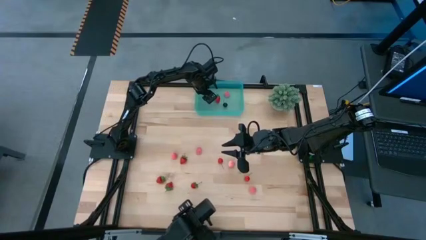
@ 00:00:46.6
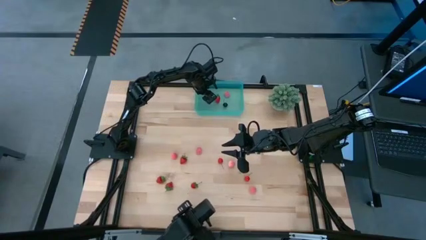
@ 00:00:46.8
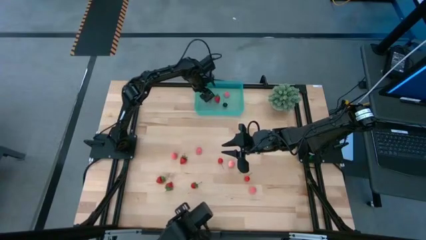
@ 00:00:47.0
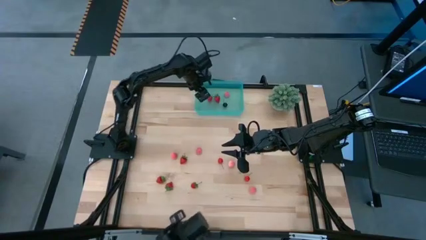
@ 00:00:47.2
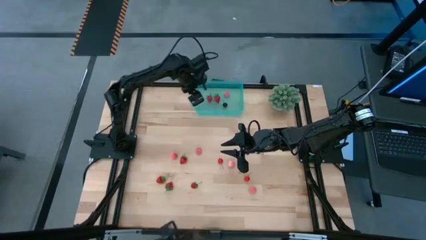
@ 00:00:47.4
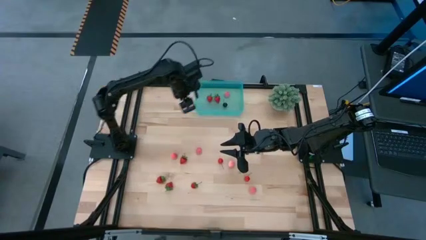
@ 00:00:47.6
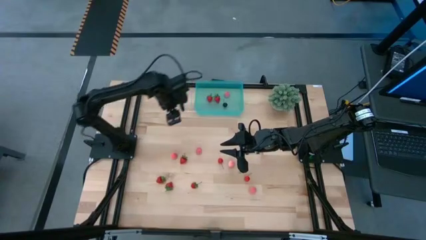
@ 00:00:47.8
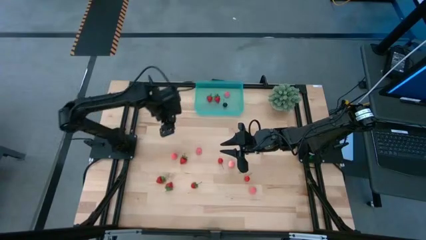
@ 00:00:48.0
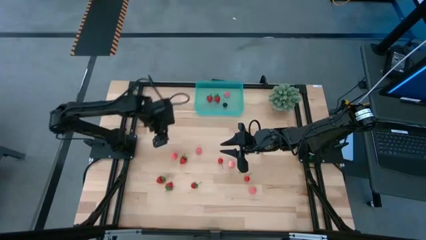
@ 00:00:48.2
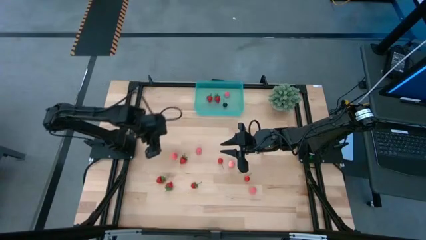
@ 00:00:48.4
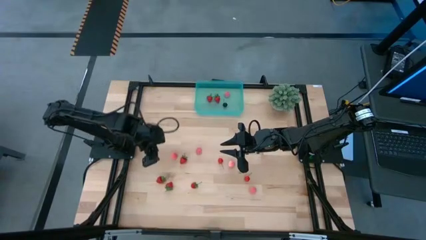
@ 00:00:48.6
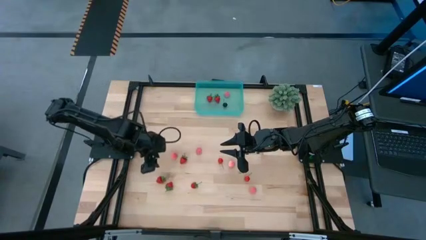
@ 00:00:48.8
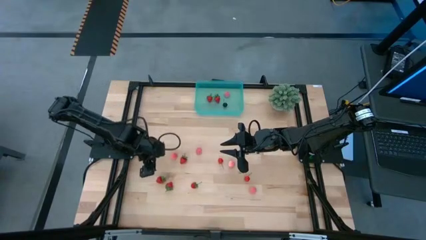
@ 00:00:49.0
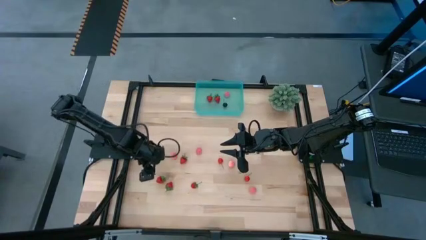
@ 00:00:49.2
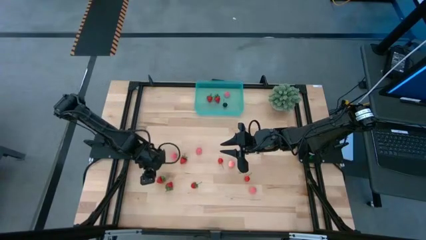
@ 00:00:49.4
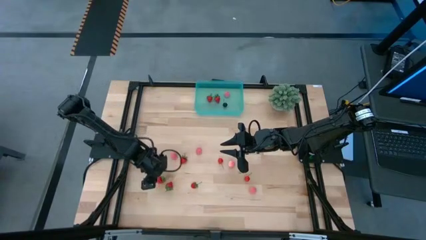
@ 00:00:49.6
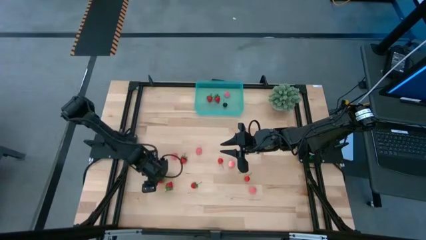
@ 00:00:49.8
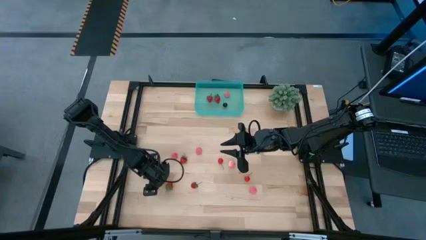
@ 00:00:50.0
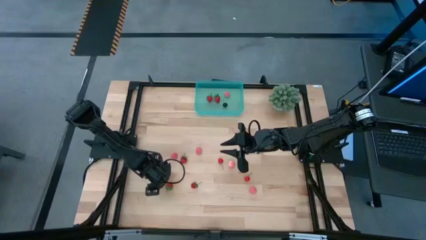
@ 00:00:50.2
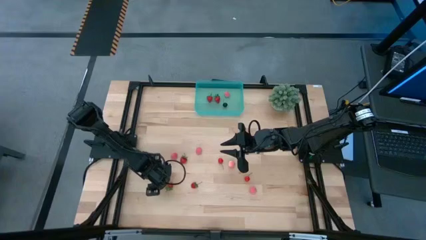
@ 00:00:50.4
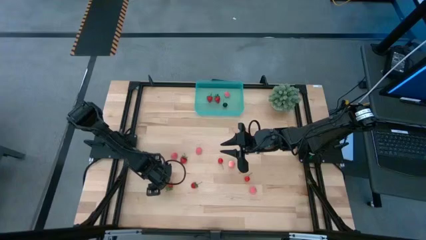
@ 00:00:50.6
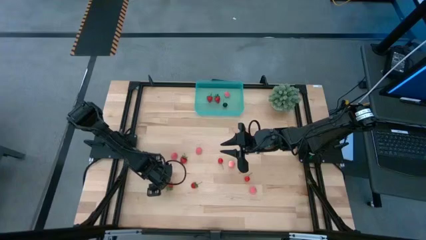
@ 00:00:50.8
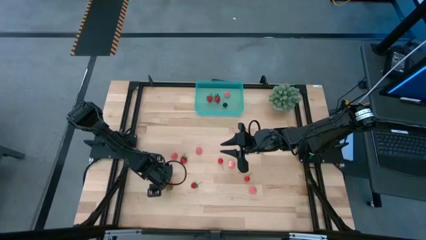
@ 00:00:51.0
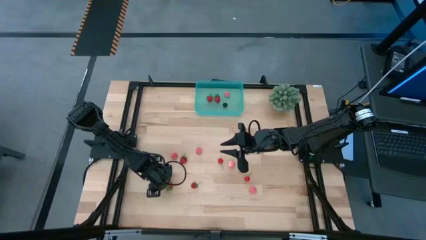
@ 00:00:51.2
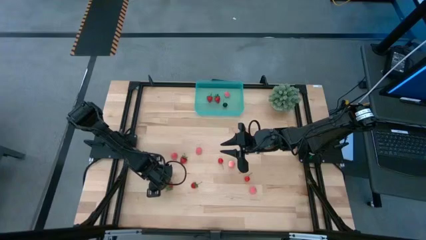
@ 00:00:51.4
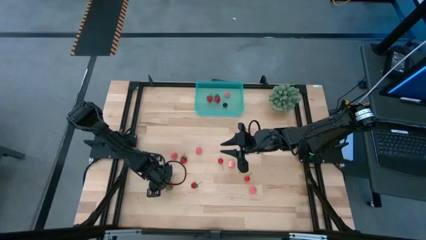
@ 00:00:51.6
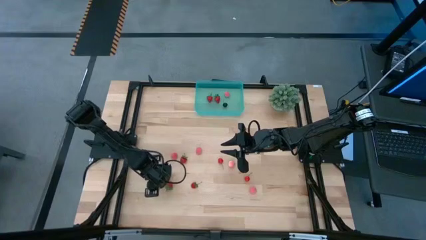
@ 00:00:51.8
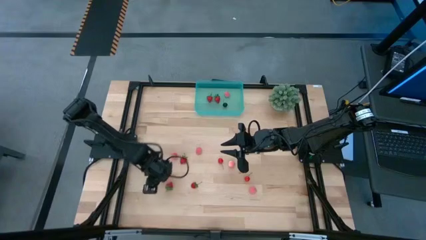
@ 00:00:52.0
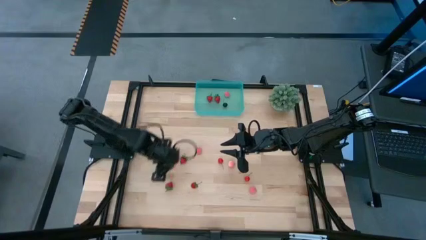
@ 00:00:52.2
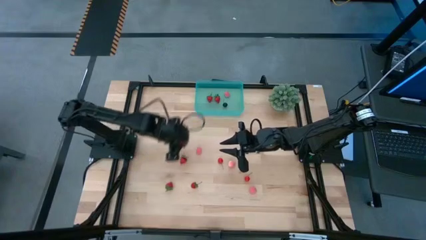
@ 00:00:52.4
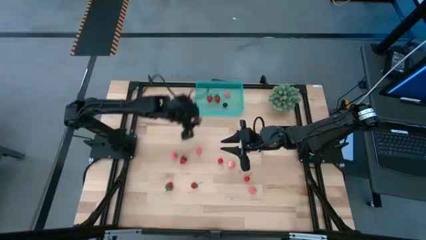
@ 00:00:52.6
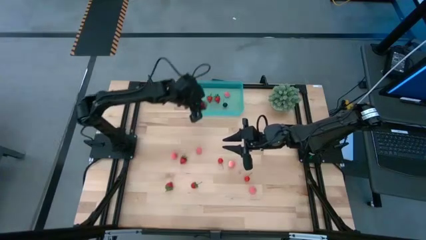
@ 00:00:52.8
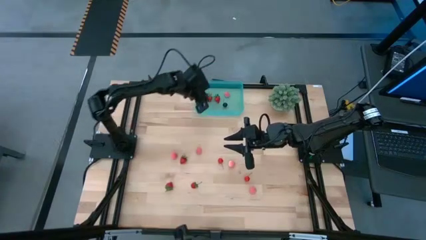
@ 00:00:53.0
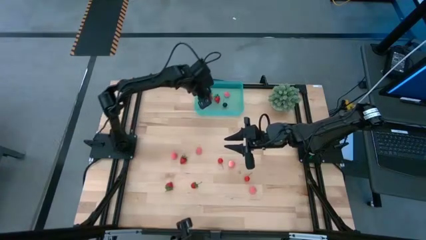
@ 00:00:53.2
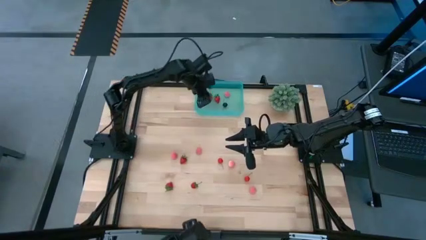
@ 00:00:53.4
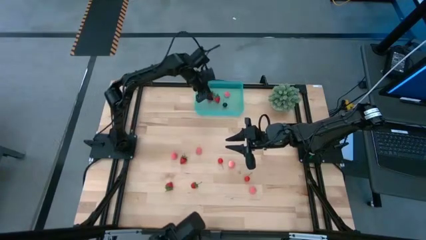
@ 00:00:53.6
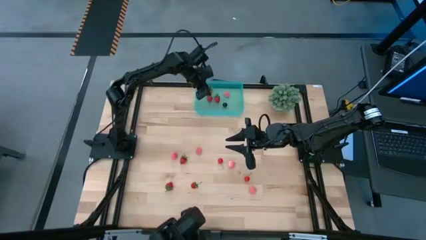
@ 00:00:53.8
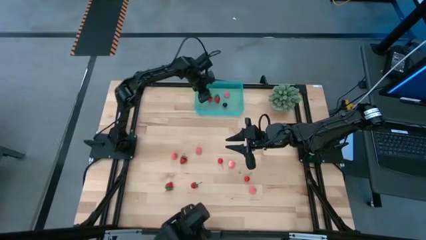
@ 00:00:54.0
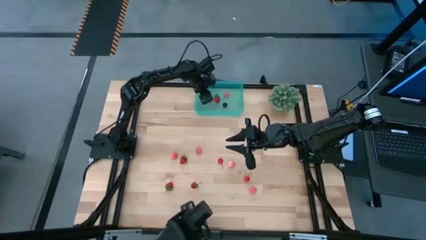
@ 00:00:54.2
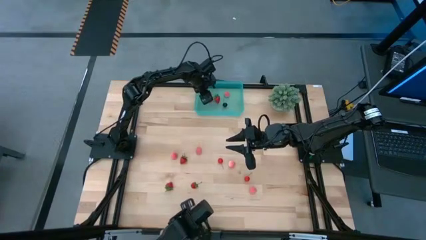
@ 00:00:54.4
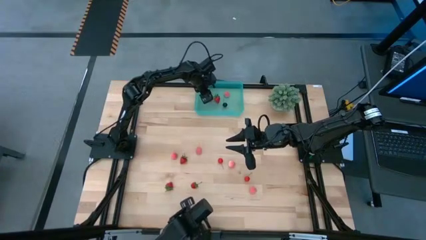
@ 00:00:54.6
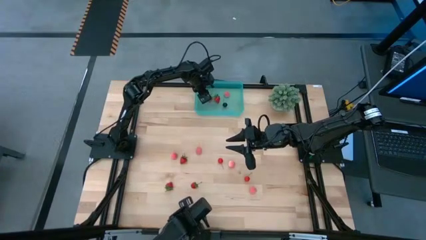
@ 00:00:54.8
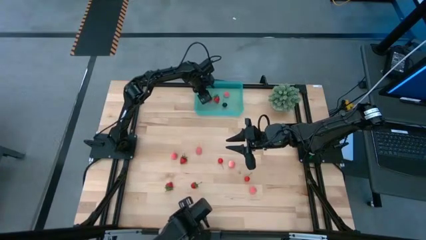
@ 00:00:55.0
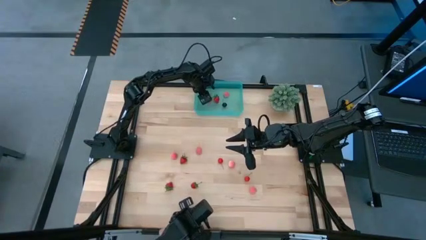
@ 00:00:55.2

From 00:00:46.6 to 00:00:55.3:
Task: Pick and placing Produce into tupperware
Put the strawberry into the blue basket

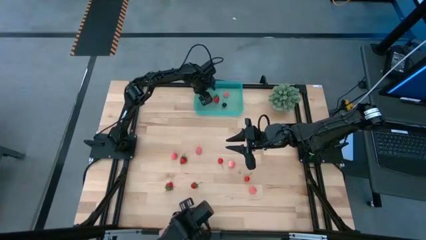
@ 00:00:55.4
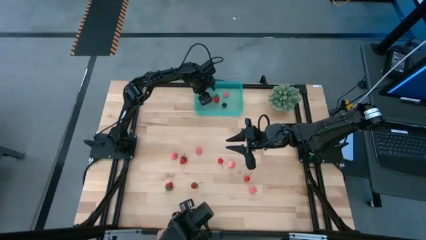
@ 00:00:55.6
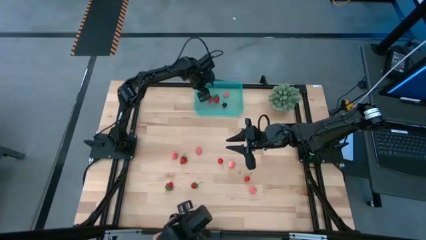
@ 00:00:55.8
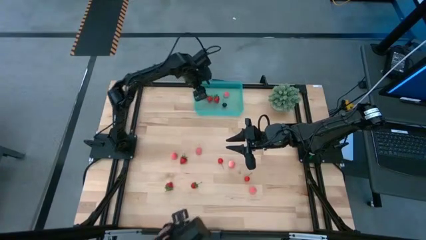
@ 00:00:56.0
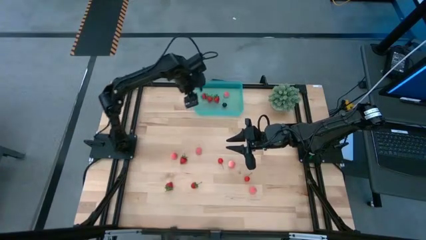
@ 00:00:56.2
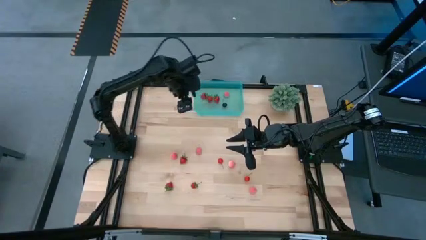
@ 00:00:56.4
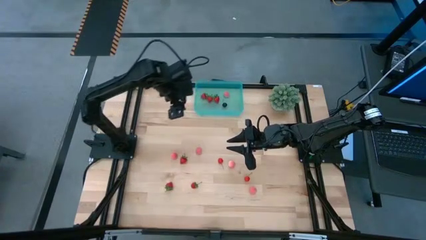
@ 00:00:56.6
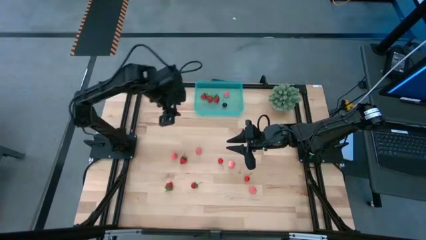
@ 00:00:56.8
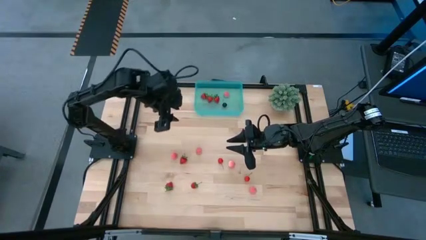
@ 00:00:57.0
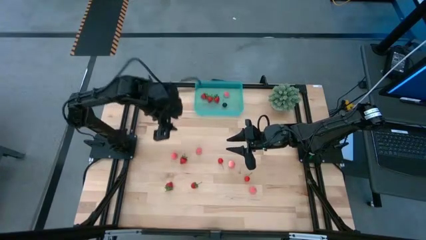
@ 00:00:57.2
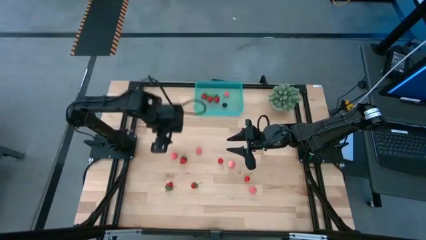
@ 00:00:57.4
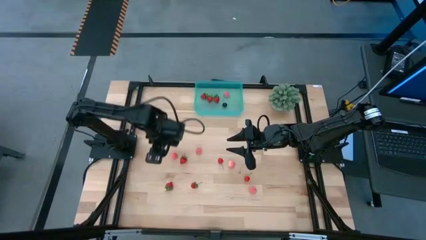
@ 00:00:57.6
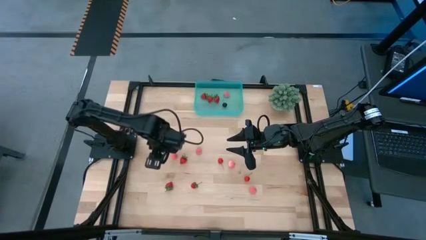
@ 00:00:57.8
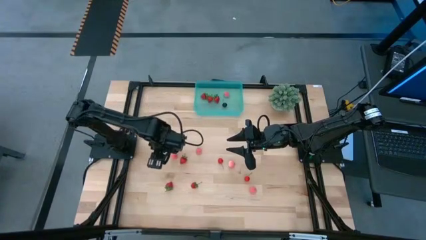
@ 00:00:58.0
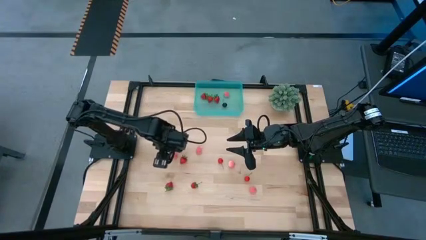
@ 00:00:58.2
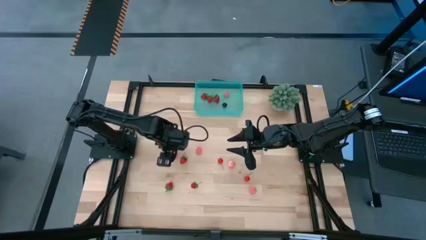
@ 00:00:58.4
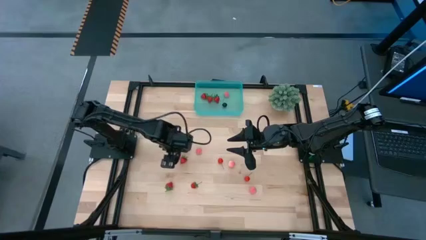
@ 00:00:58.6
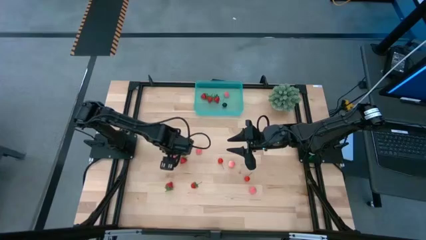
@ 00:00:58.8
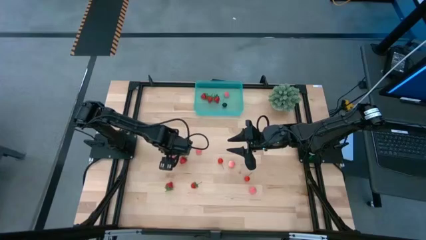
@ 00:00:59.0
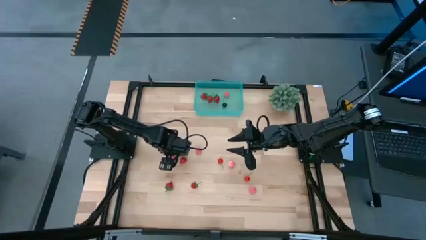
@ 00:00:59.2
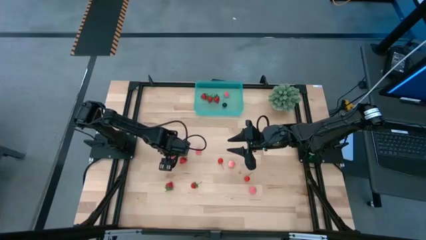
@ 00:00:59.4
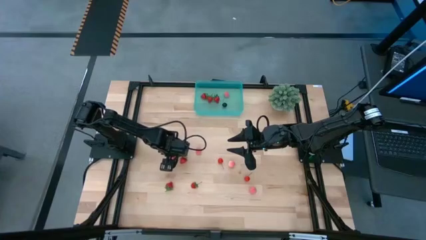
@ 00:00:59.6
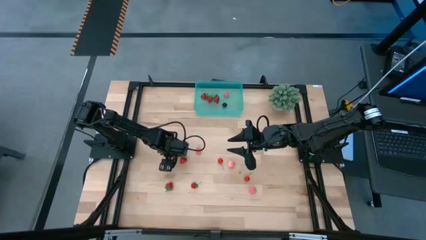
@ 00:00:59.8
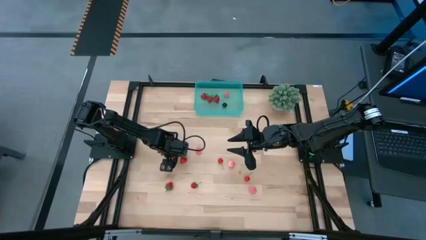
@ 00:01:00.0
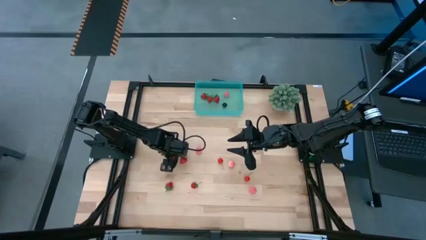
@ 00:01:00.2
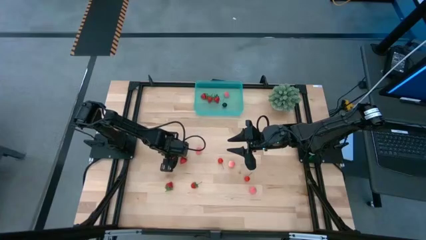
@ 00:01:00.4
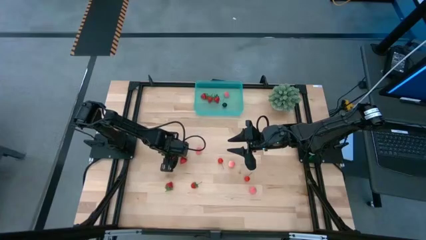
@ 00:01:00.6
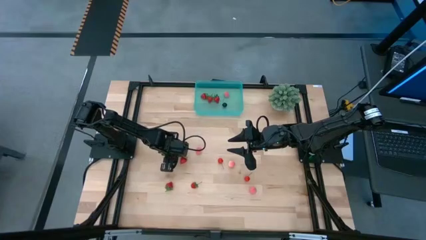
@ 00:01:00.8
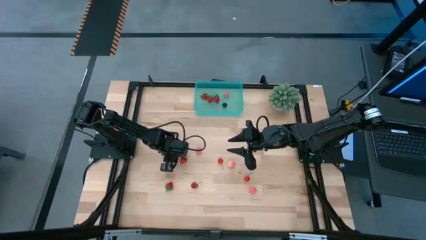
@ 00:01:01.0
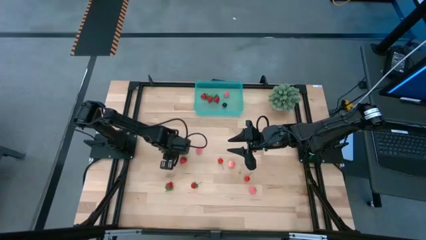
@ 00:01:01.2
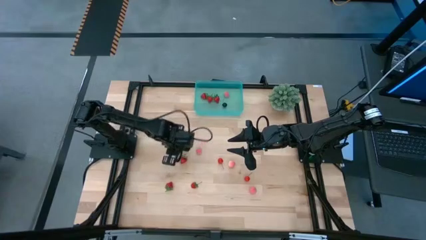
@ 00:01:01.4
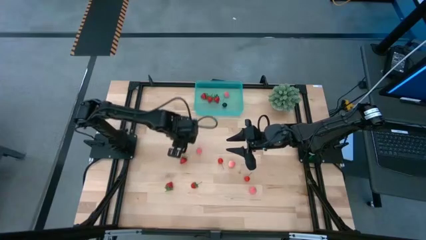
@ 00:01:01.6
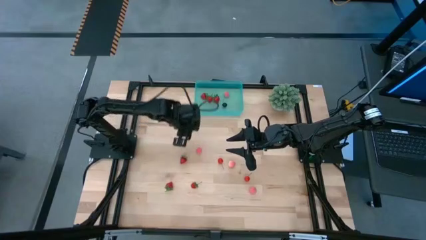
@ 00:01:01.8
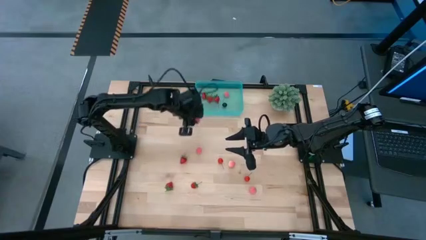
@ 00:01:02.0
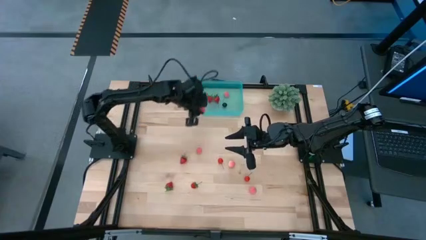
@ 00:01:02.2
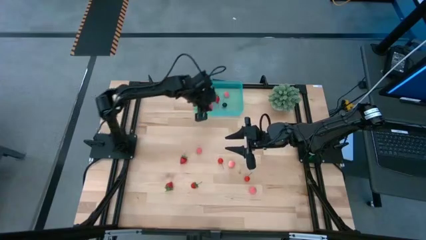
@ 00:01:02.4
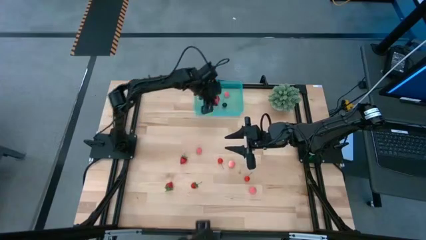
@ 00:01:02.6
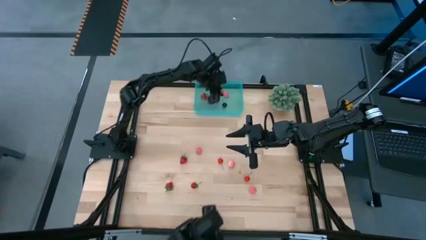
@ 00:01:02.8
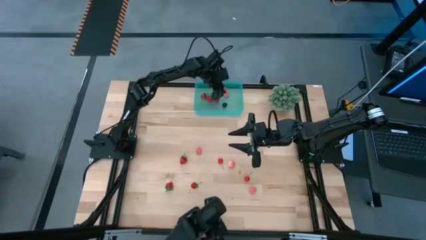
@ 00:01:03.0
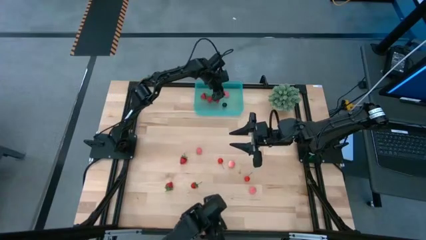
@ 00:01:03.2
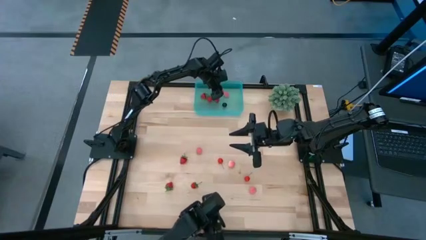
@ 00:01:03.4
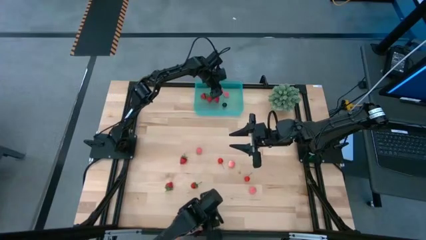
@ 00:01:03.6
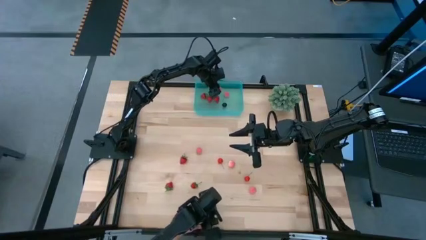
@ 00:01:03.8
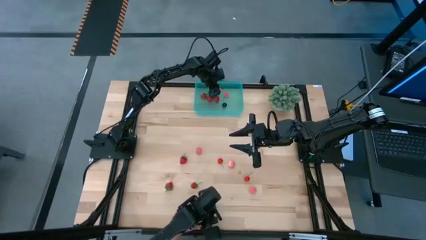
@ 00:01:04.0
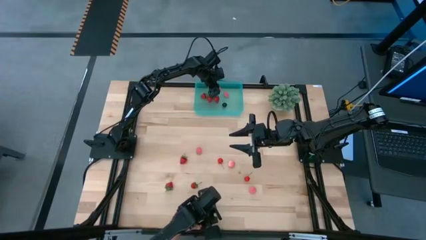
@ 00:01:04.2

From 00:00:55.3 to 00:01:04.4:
Put the apricot into the blue basket
